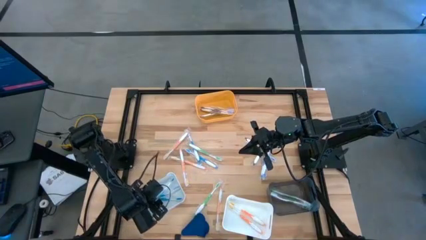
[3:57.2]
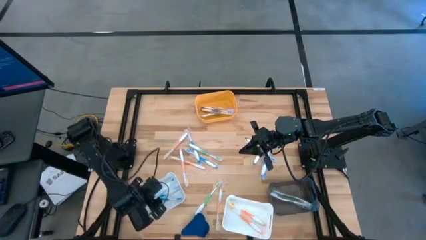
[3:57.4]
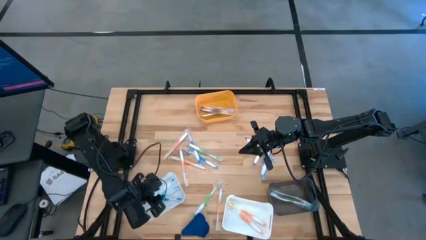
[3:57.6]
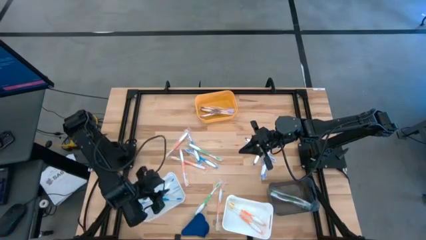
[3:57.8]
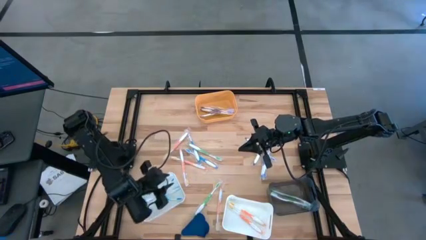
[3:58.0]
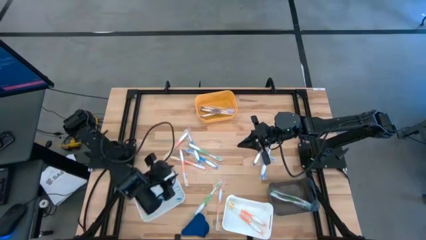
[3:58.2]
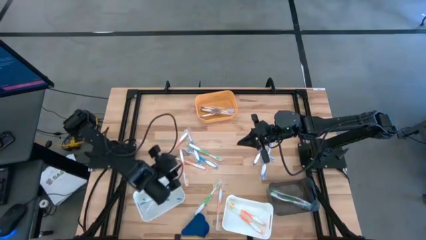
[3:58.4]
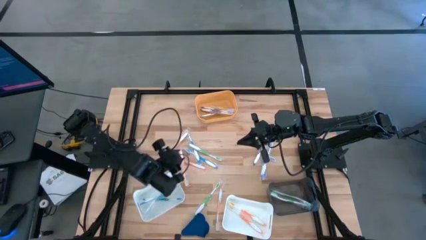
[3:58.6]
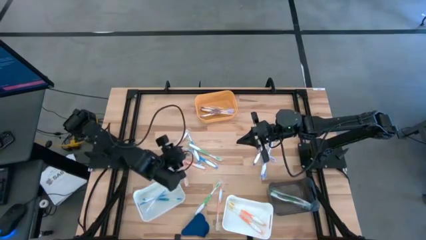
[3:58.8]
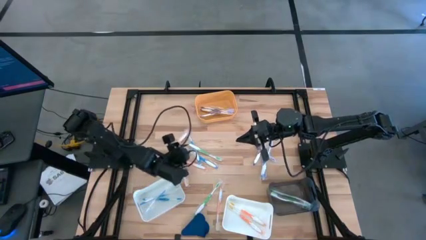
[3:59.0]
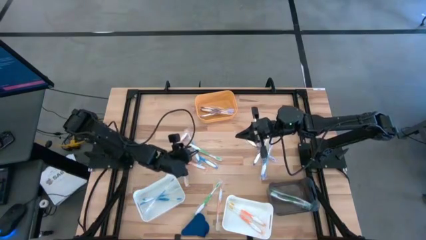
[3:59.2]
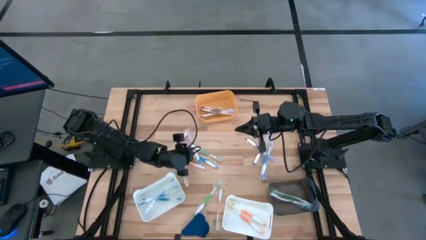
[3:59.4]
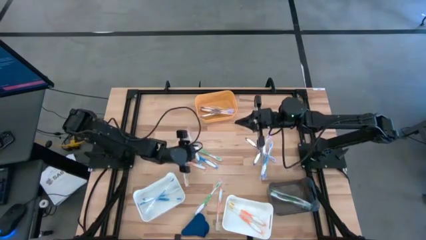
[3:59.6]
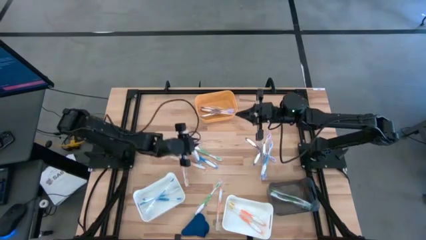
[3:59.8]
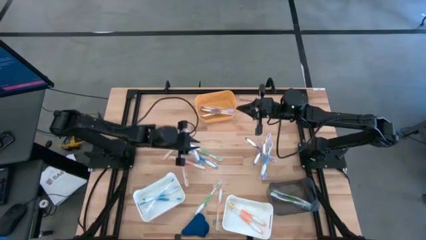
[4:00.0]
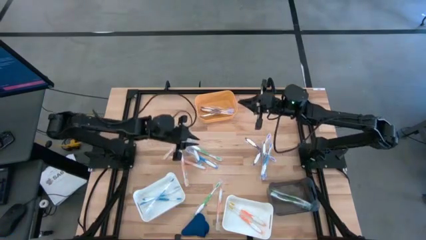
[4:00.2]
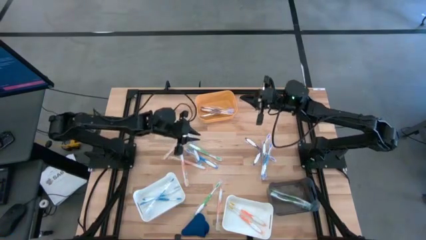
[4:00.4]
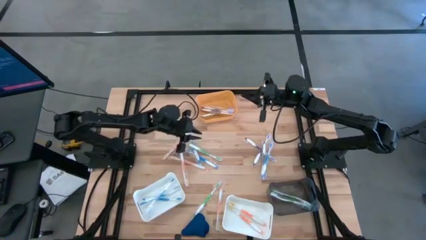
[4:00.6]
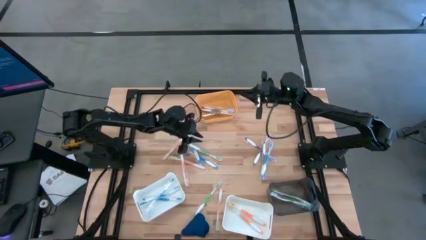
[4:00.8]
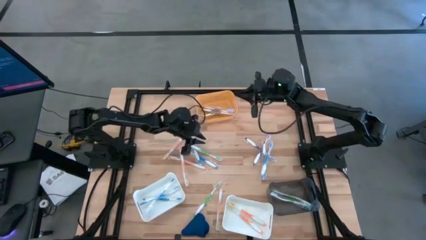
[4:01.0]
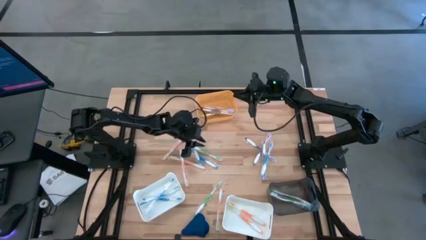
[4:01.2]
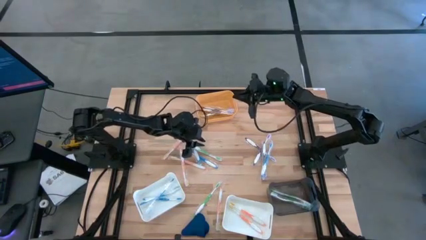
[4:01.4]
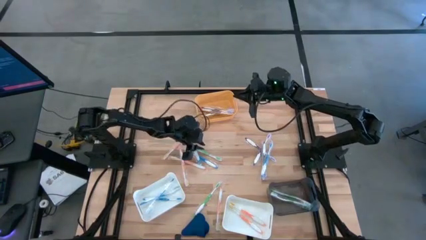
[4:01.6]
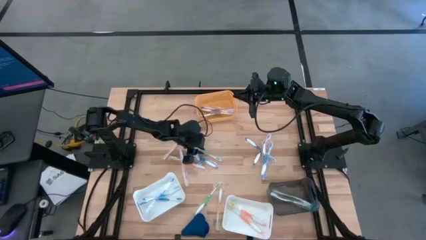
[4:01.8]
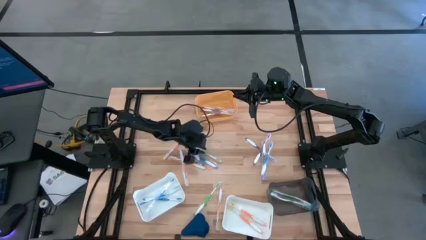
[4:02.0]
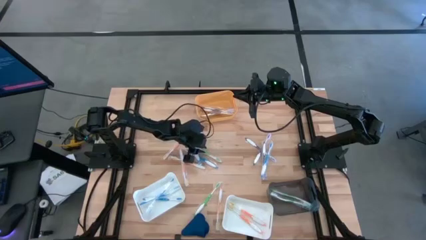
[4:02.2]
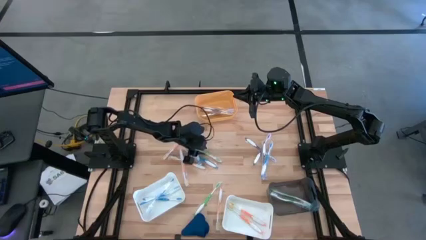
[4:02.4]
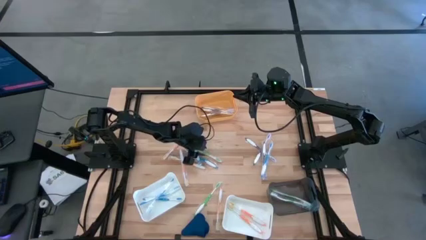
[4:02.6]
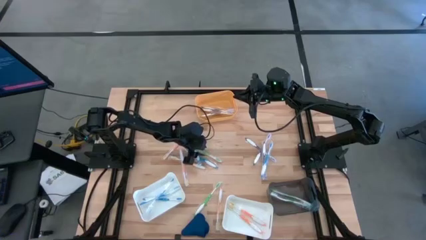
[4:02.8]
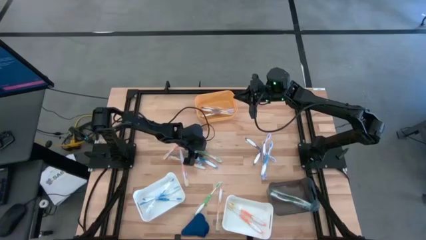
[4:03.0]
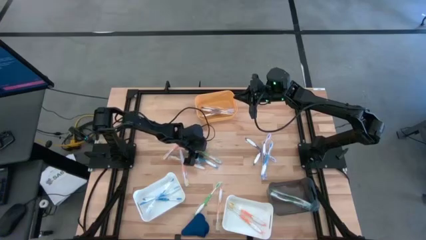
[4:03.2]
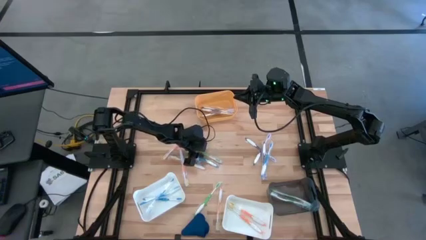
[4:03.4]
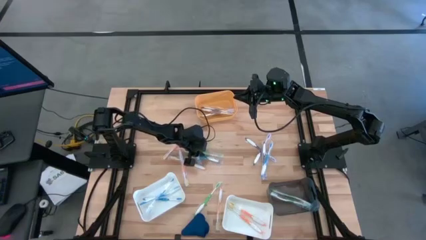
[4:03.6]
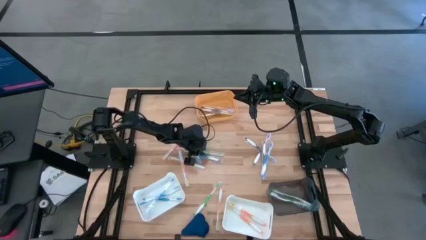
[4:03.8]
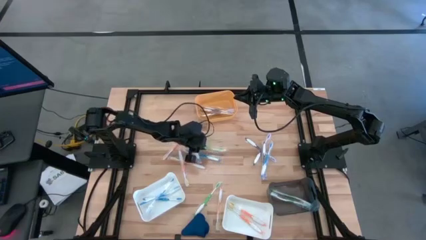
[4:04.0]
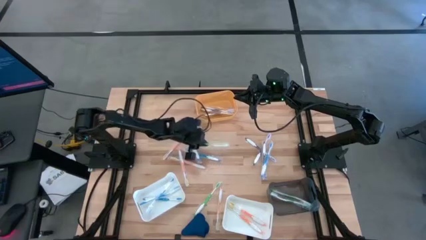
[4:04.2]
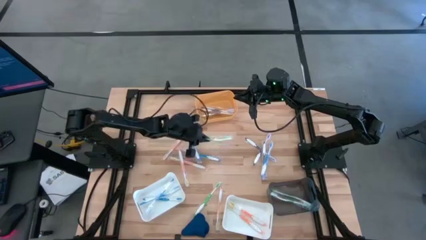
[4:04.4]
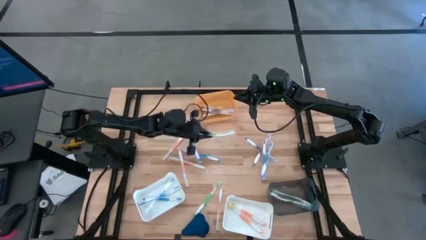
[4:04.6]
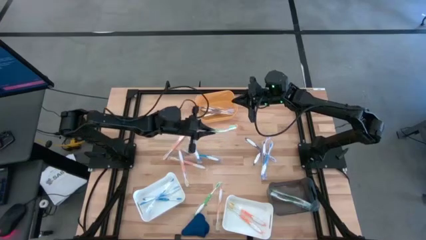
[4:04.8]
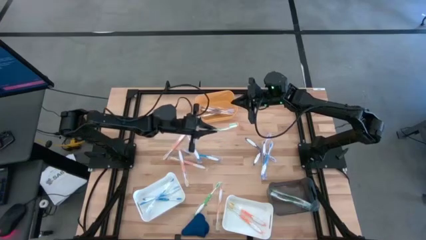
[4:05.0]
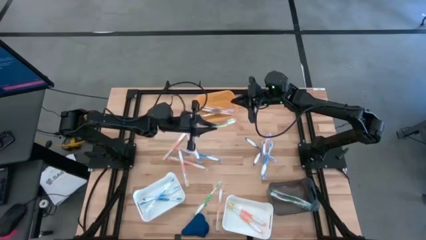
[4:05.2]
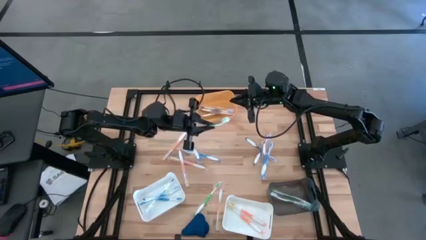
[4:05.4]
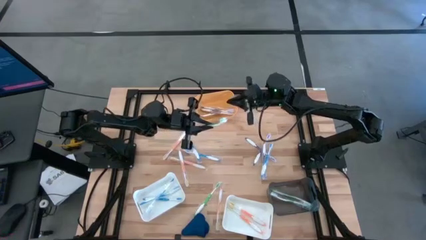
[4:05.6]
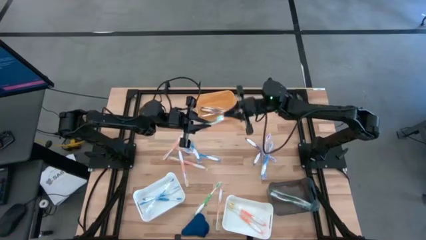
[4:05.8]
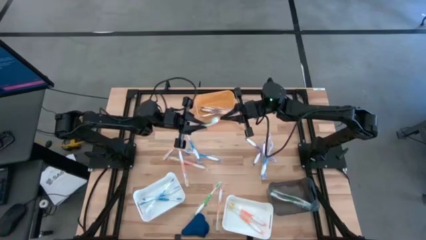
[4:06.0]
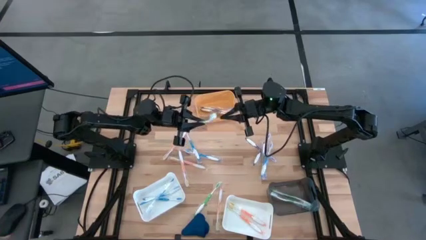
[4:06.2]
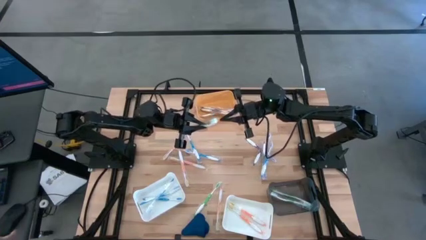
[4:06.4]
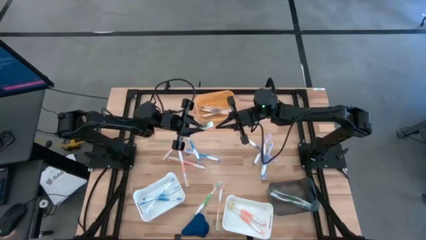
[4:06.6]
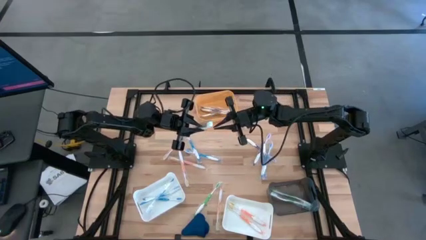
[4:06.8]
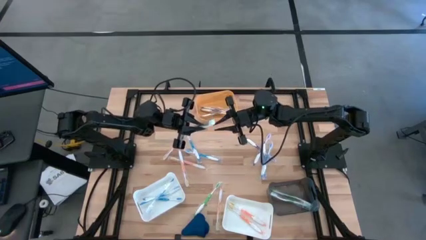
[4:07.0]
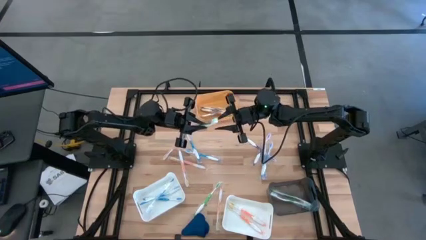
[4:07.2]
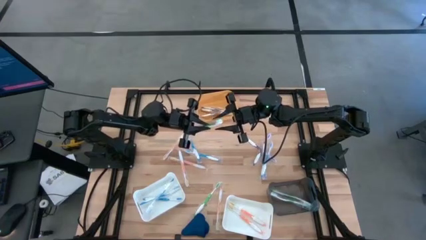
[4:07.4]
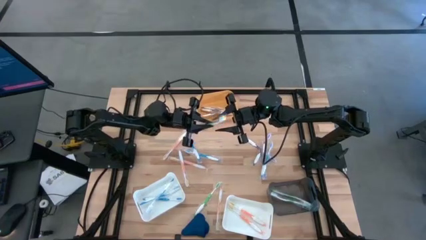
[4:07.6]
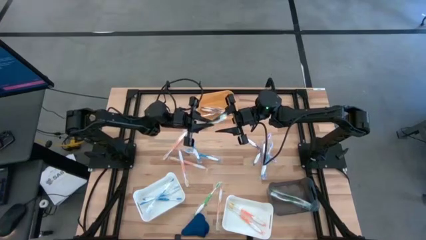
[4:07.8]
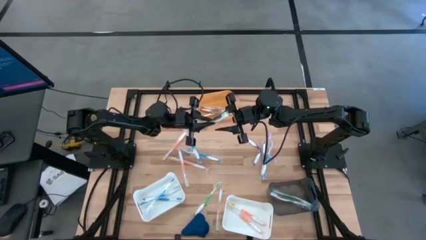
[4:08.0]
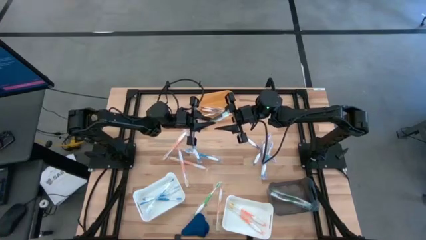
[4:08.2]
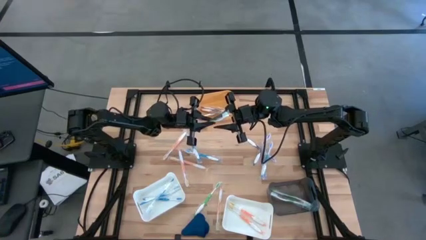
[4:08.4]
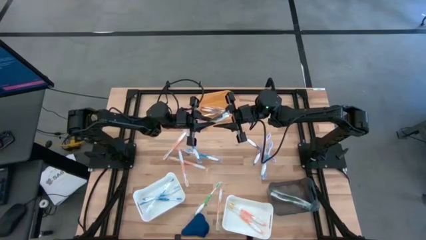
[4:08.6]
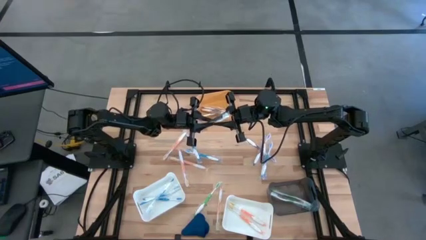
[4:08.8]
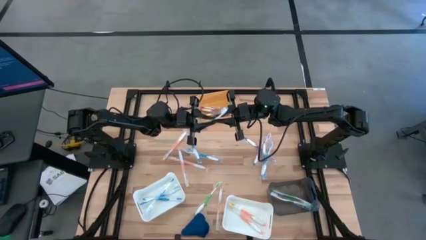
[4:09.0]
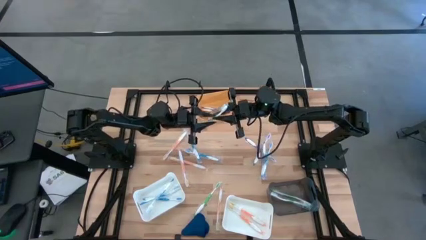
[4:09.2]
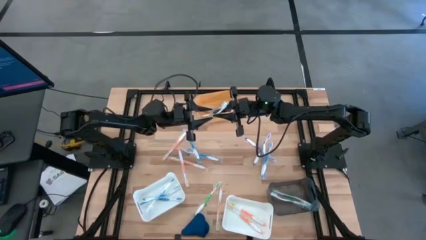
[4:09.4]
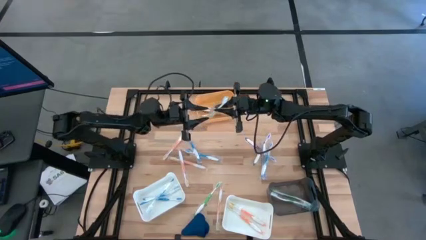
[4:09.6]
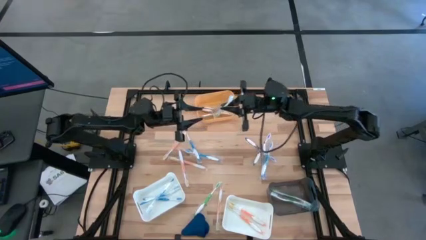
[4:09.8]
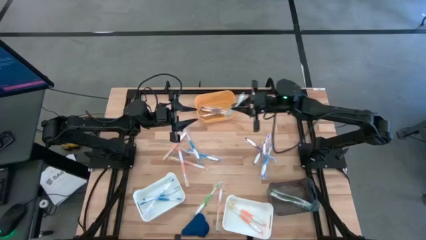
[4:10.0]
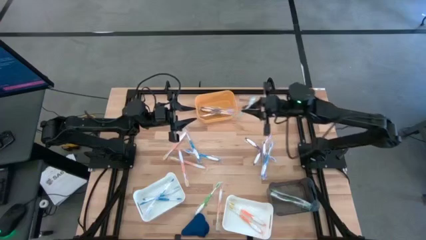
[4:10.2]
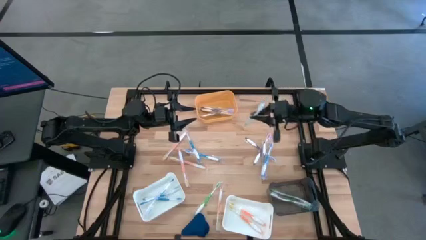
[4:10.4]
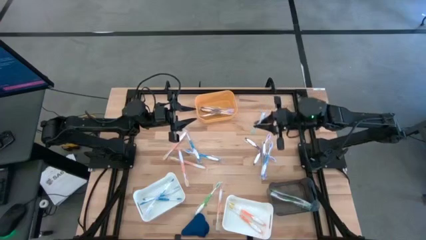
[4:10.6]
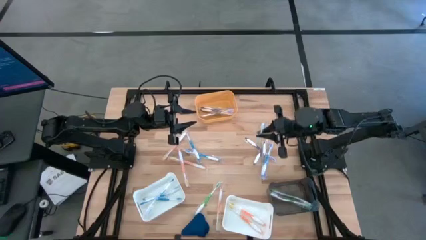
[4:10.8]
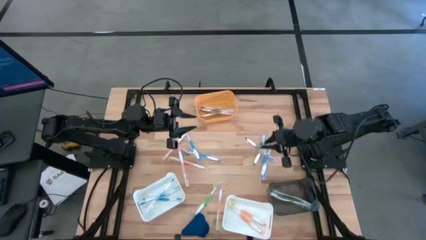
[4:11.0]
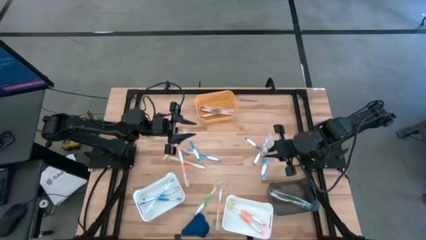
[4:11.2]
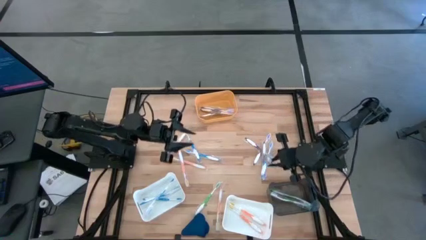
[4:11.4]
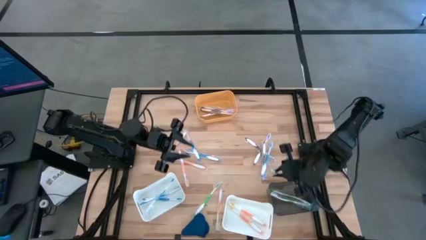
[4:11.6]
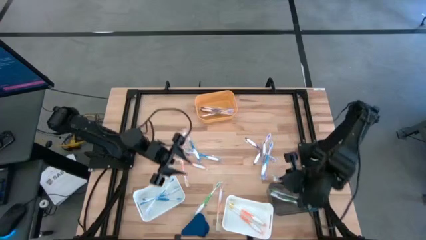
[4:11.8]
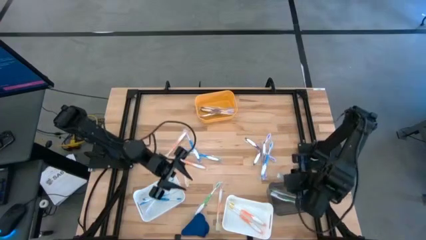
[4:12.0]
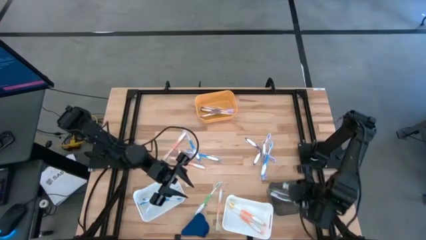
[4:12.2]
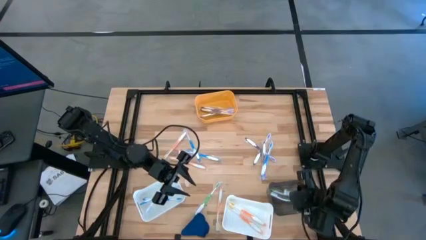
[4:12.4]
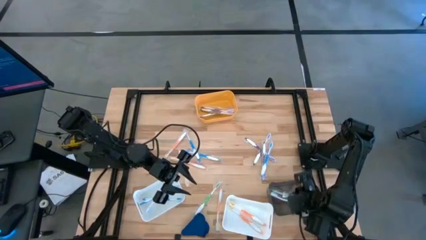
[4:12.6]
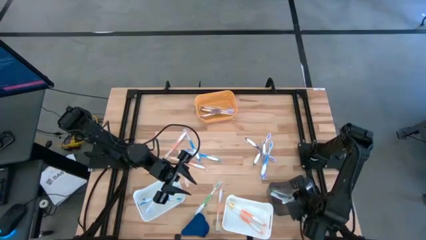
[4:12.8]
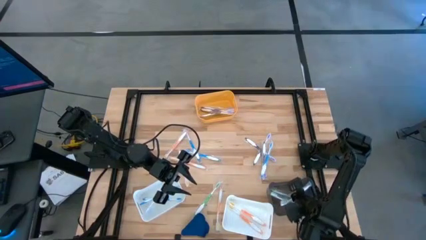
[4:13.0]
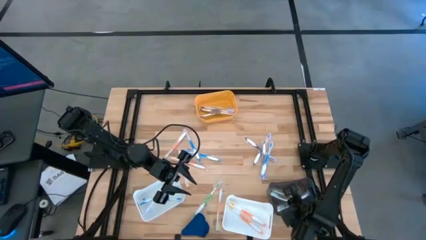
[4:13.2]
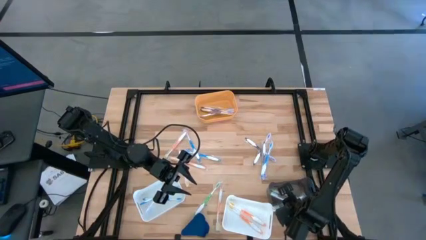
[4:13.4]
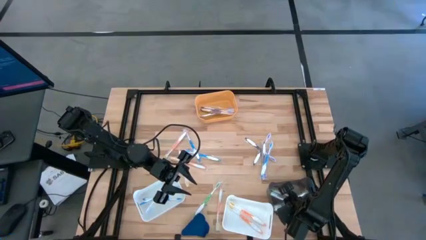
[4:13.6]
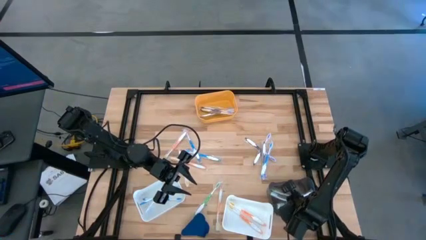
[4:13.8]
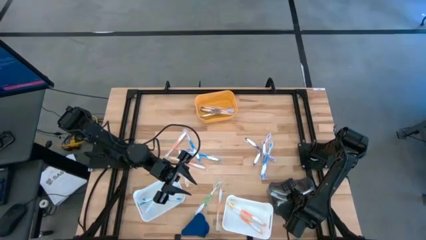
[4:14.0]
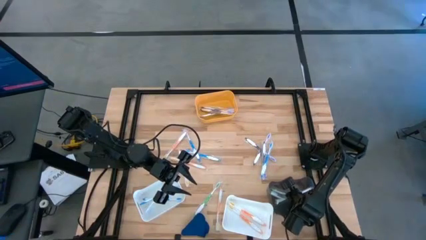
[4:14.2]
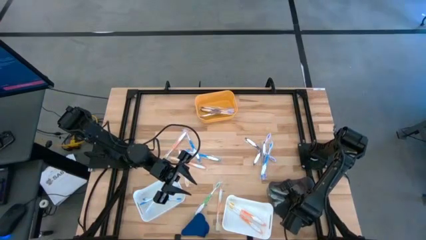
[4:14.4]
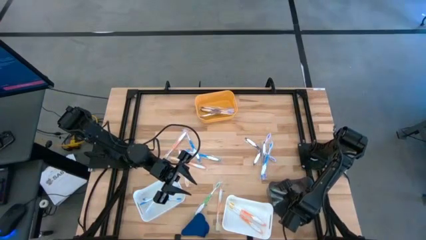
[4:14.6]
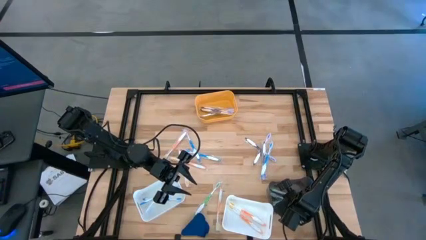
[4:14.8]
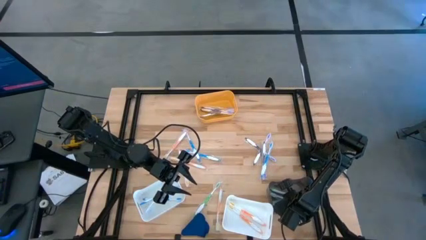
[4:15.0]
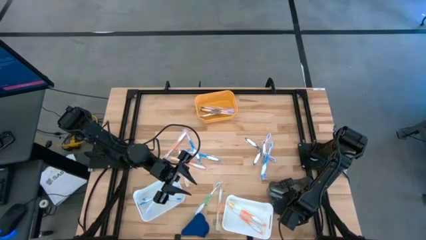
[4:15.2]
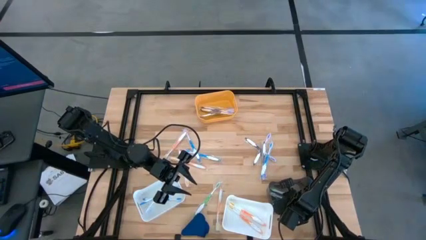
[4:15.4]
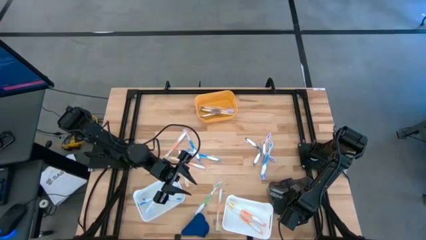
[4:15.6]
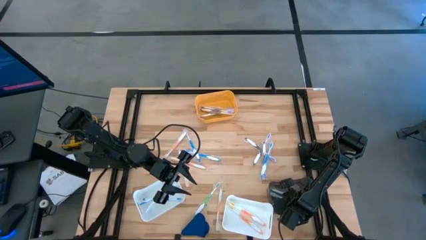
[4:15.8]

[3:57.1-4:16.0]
Task: Pick & Place Toothbrushes
Put the green toothbrush into the black bin
